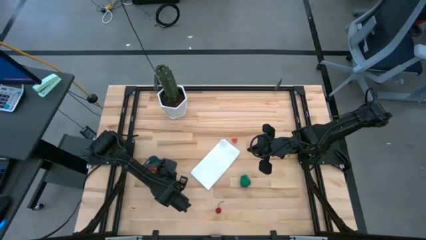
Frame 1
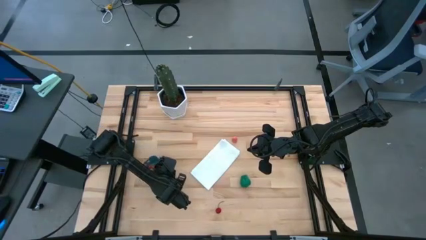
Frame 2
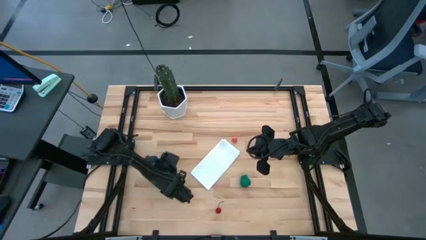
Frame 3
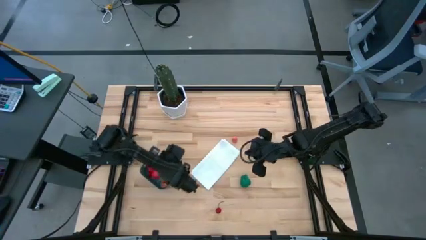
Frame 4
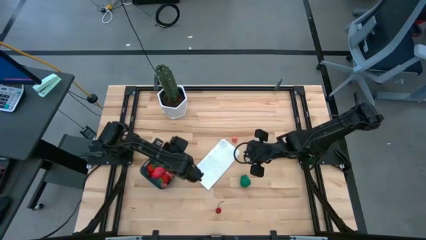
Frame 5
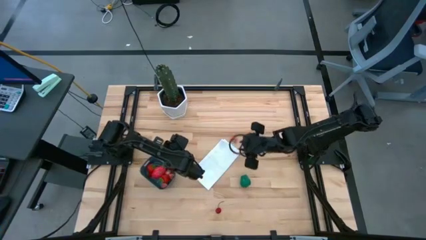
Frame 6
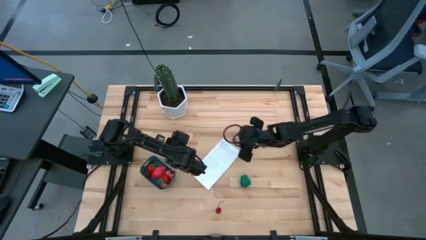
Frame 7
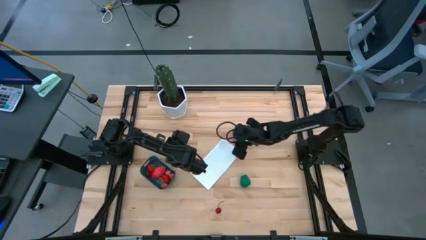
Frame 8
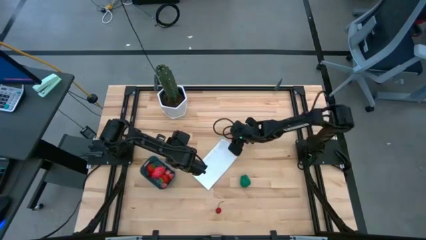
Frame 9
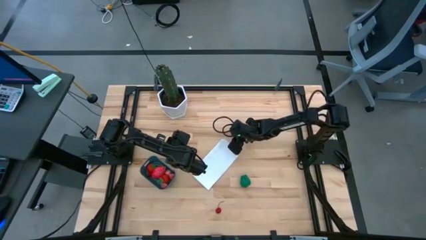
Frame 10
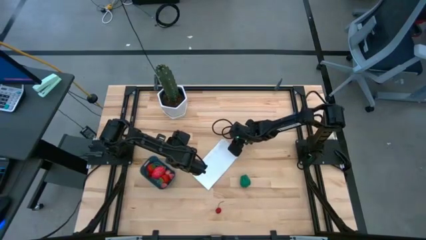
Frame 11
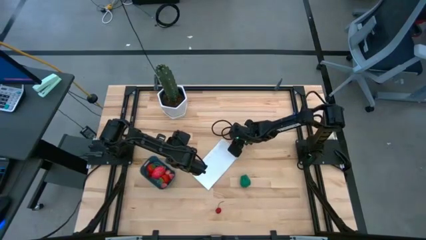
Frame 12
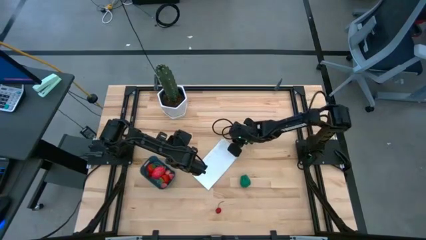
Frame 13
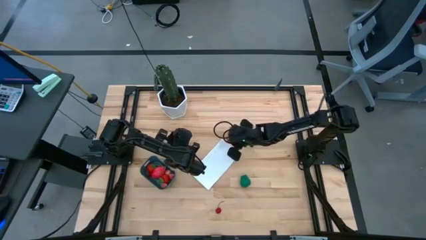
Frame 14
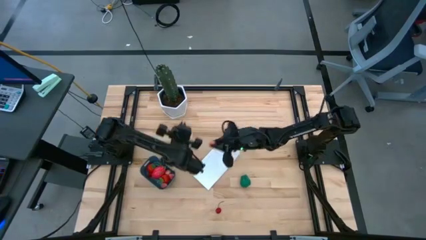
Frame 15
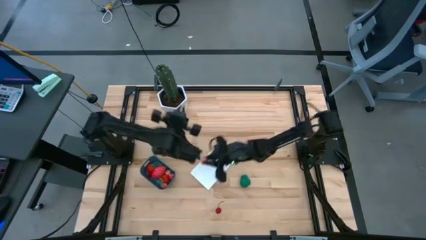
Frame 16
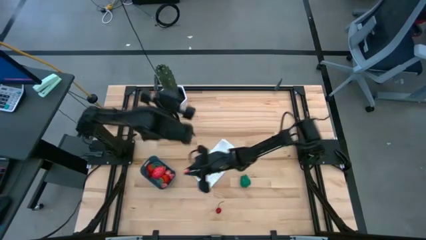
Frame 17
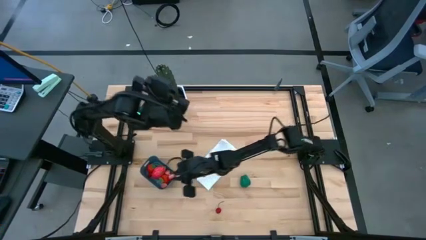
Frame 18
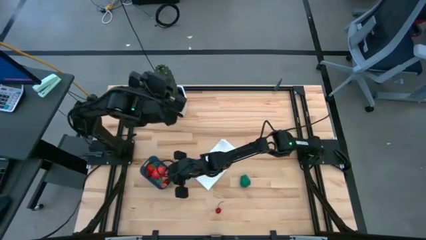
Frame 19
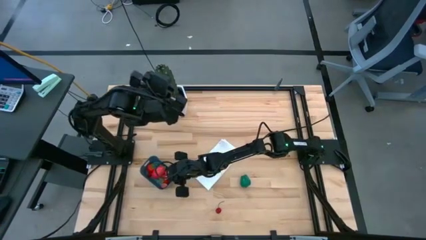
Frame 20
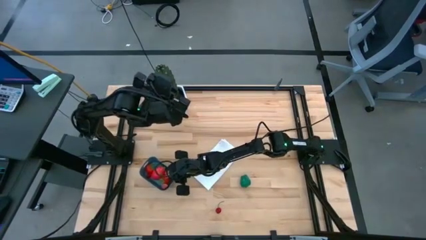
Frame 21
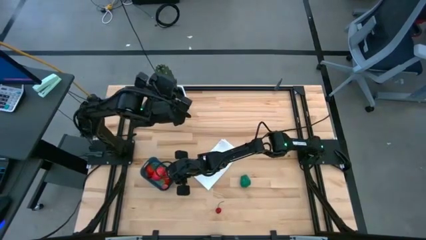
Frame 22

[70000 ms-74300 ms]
Task: Pick and placing Produce into tupperware
Put the peach into the blue bin

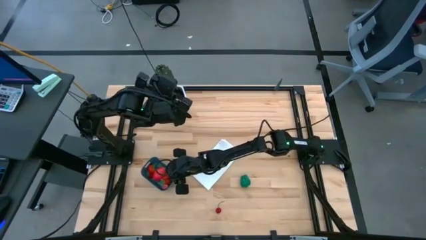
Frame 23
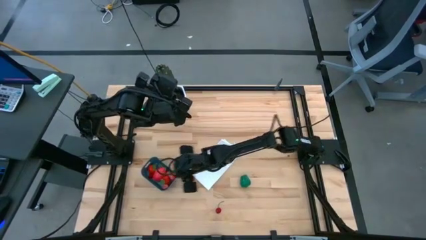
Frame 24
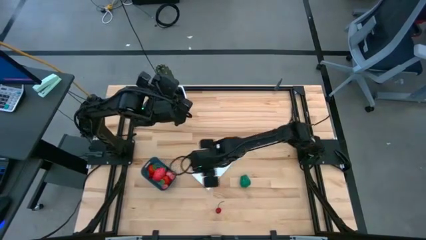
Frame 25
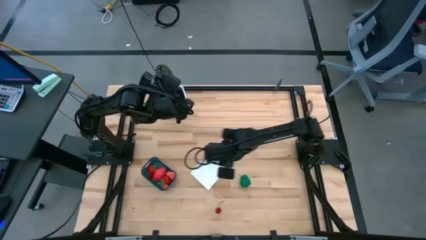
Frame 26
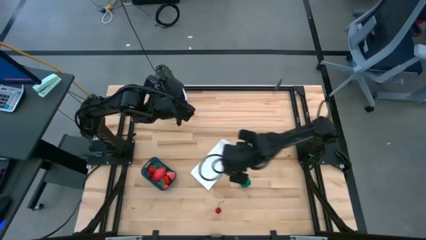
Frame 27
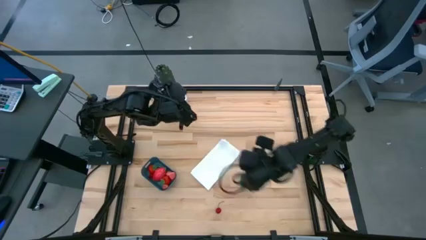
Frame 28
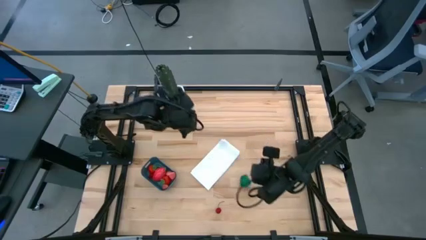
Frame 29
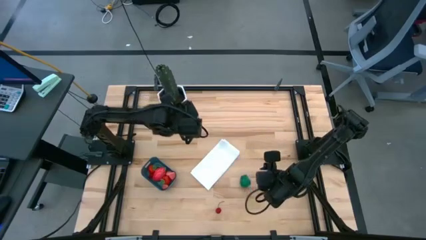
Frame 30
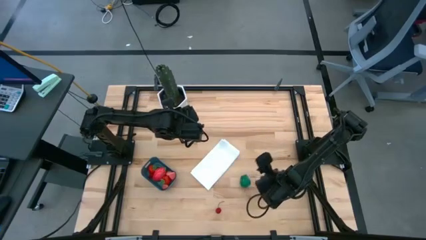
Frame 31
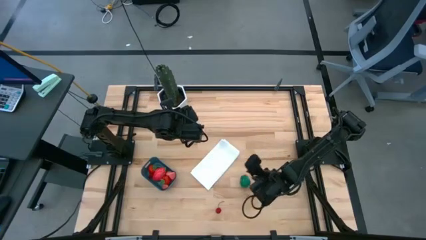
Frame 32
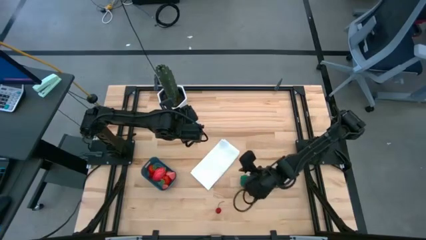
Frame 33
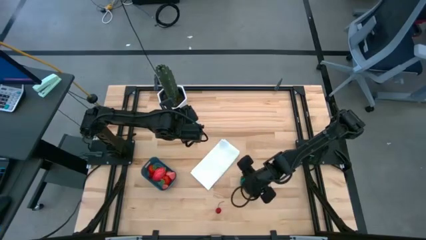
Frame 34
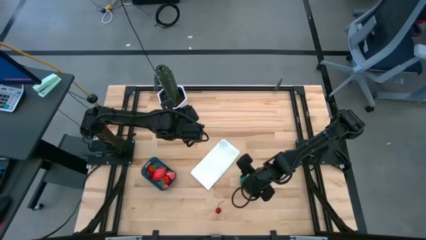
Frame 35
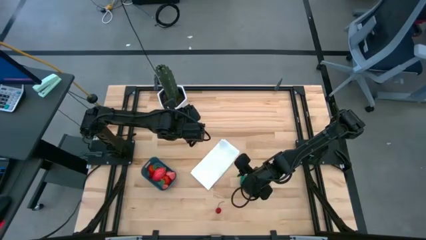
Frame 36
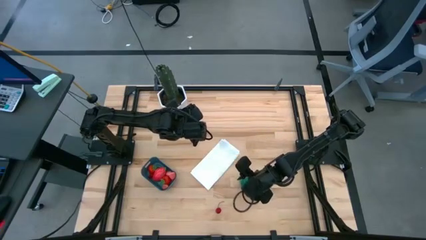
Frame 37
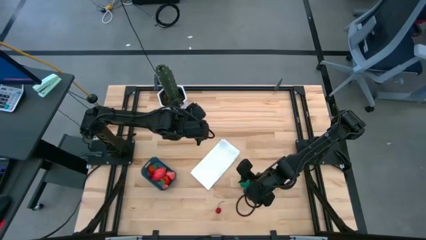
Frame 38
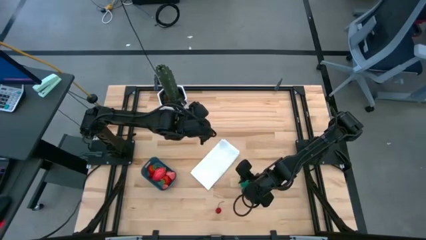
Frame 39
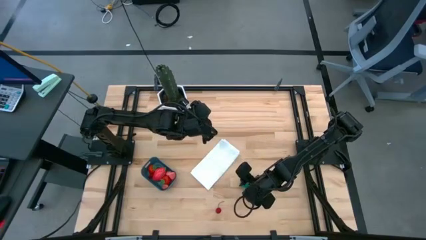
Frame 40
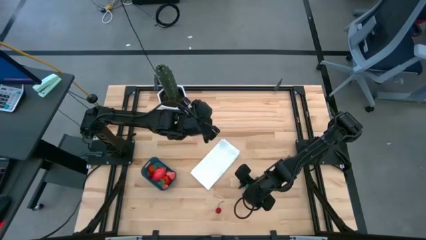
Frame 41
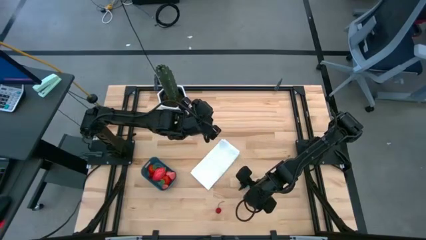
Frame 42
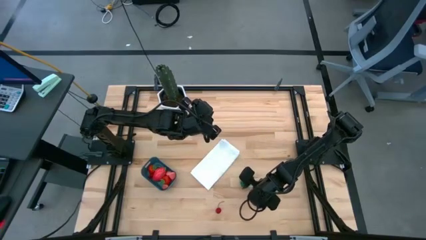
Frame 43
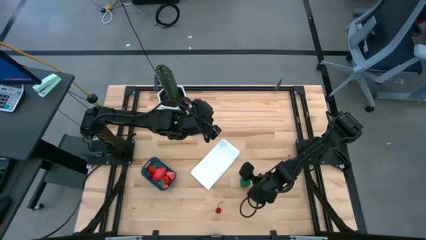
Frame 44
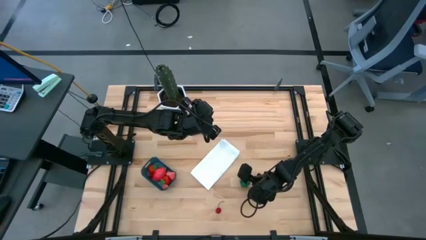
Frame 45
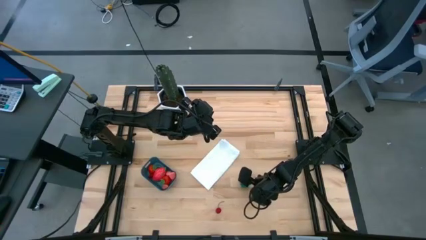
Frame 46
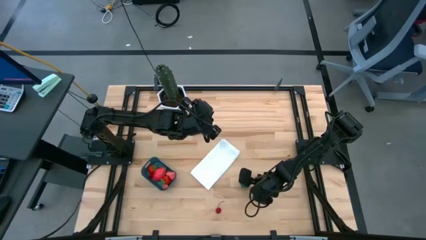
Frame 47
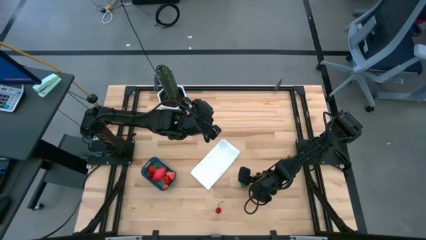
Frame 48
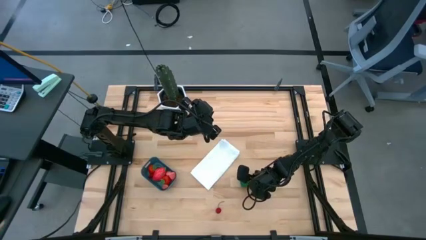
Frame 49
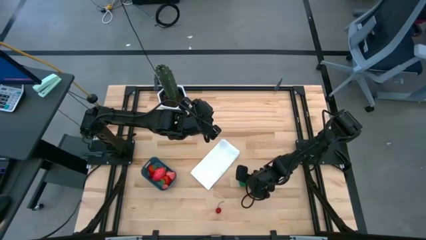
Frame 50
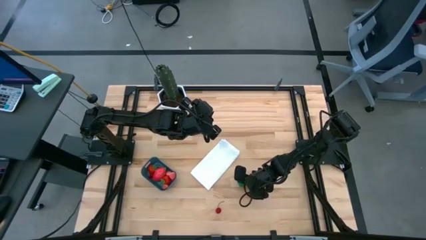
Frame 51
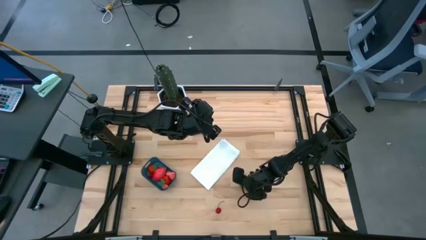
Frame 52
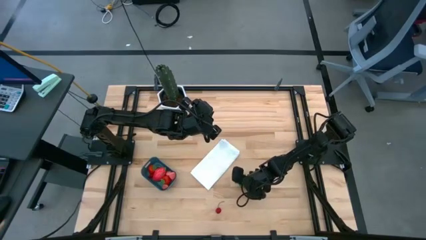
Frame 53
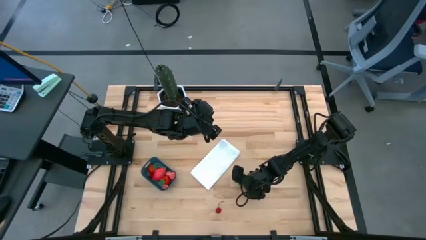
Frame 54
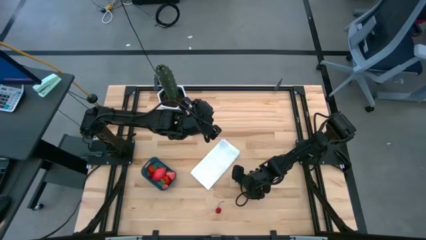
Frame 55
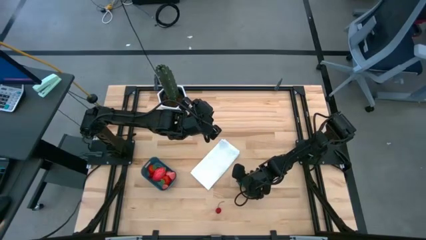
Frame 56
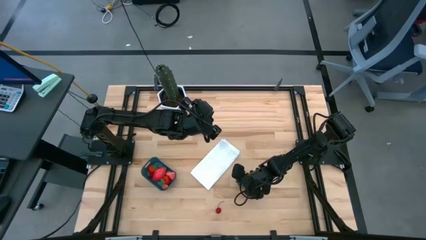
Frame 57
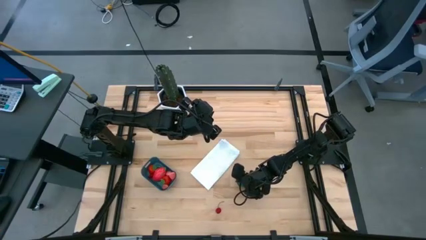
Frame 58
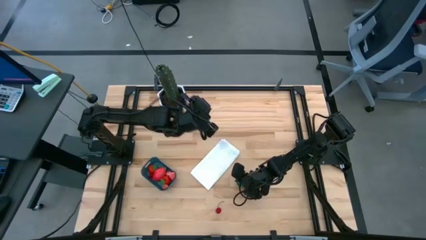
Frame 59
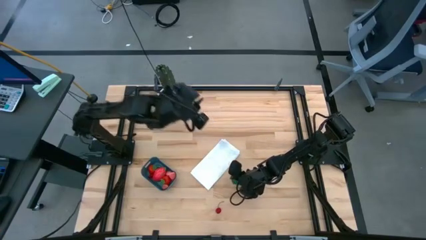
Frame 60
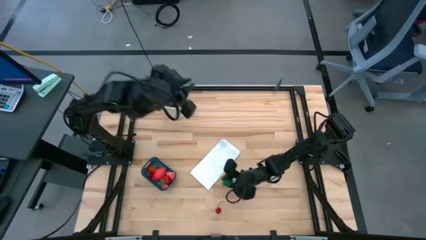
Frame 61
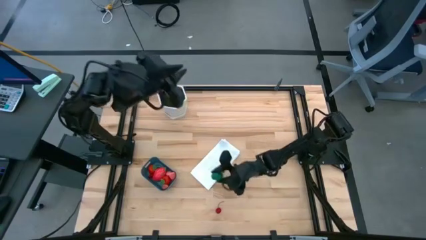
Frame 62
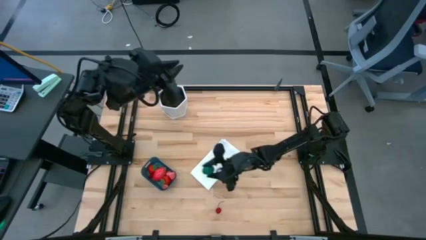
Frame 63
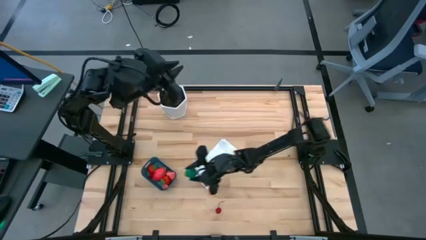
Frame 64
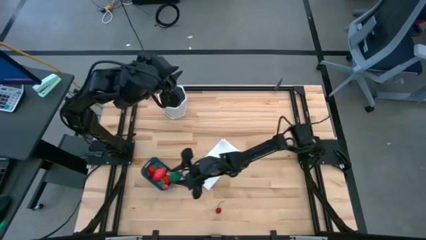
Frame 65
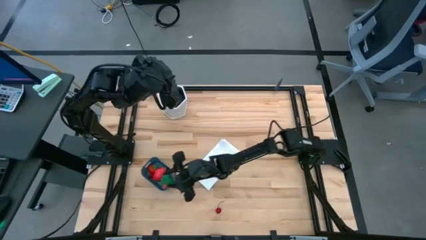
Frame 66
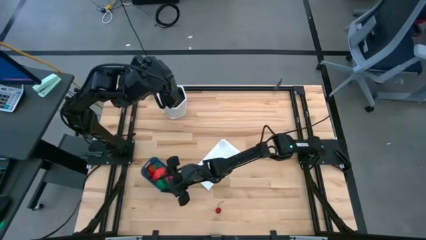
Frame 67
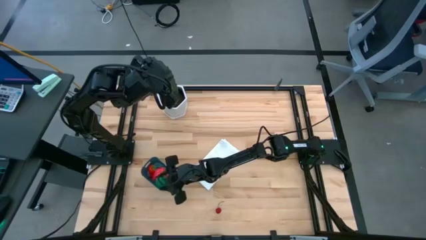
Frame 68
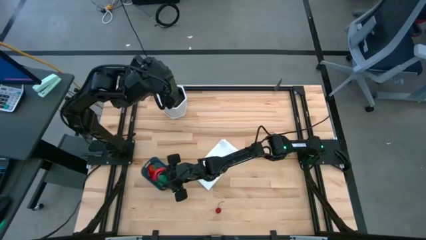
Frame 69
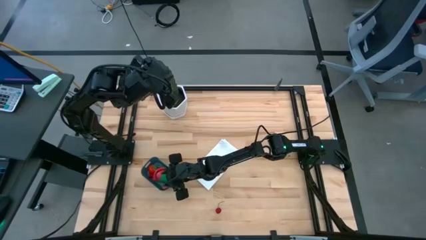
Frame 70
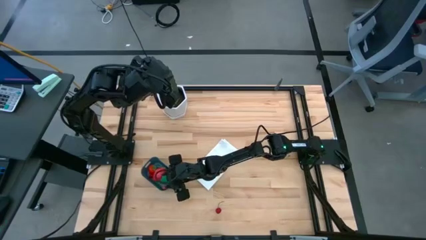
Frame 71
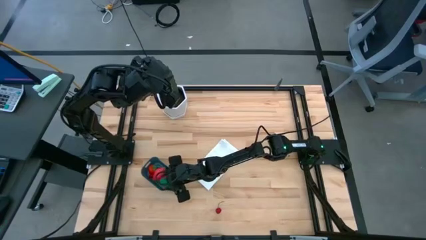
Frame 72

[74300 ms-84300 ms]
Put the bell pepper into the blue bin

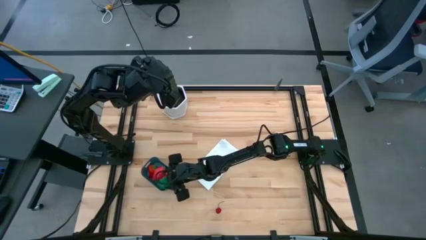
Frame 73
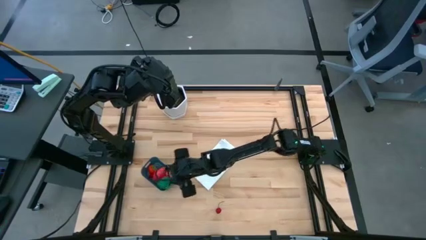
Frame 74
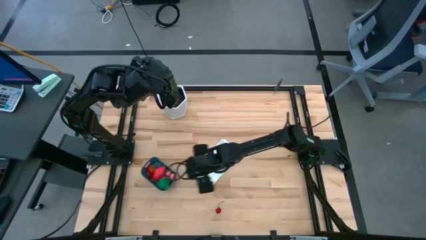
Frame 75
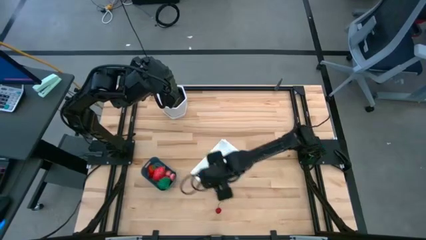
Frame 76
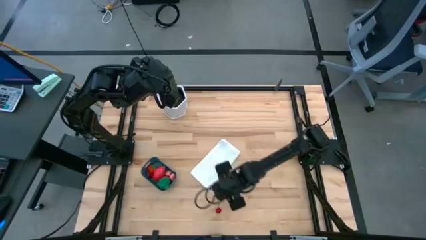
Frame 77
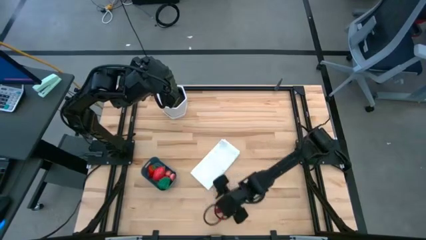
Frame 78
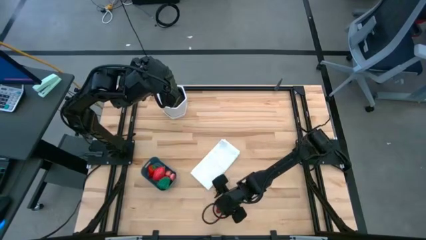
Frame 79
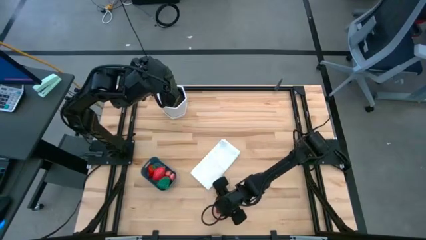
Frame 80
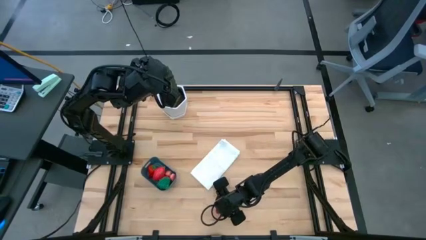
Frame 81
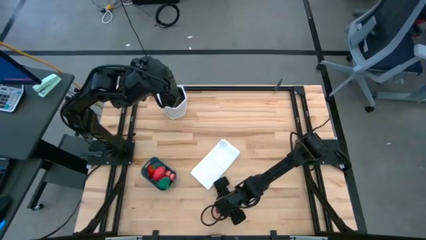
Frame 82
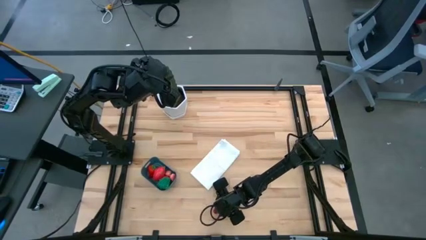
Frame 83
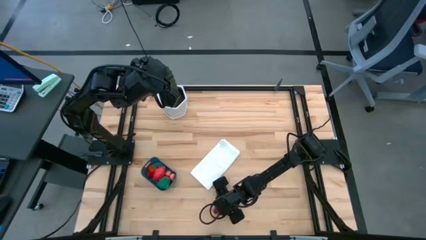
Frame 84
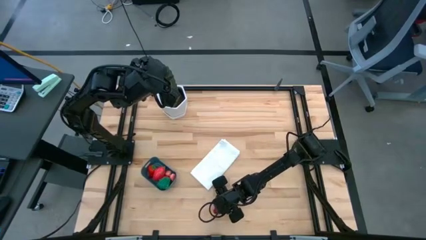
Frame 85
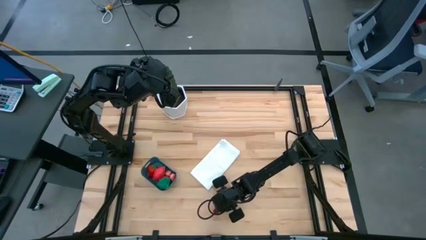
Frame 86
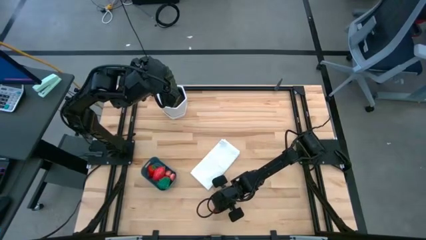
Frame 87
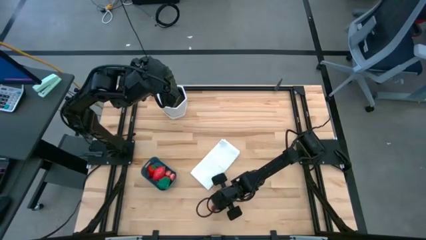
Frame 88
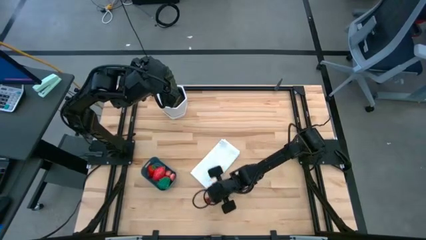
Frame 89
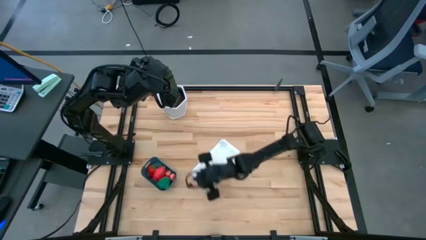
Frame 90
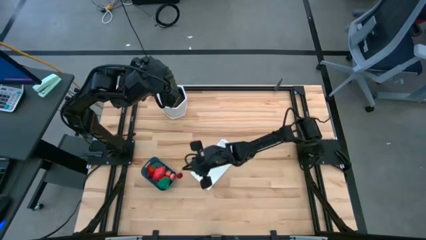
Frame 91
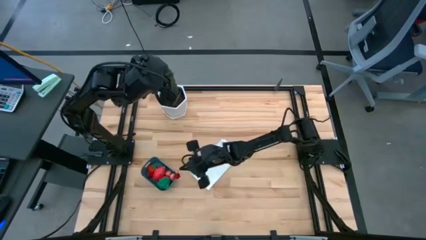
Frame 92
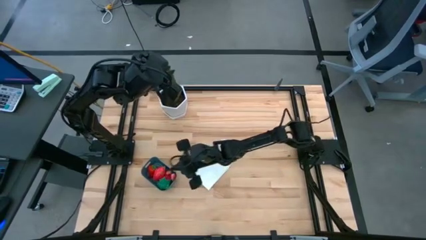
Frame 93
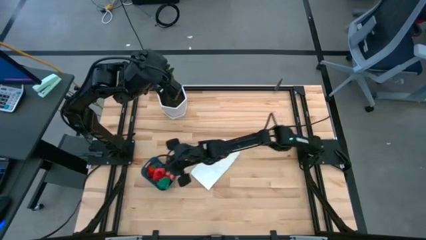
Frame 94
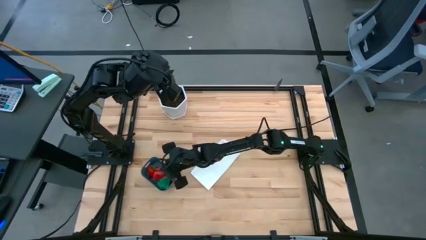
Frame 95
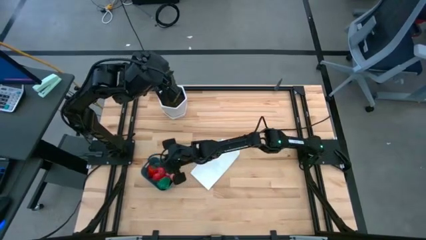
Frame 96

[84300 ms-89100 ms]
Put the cherry into the blue bin
